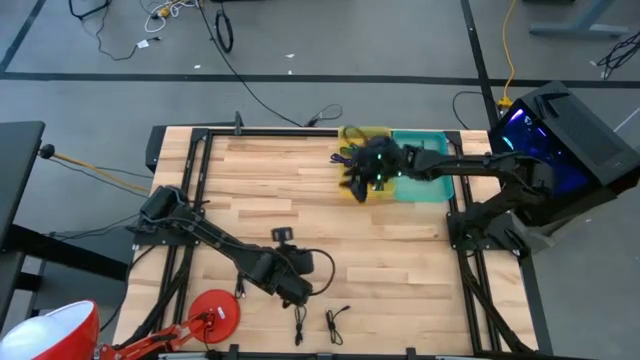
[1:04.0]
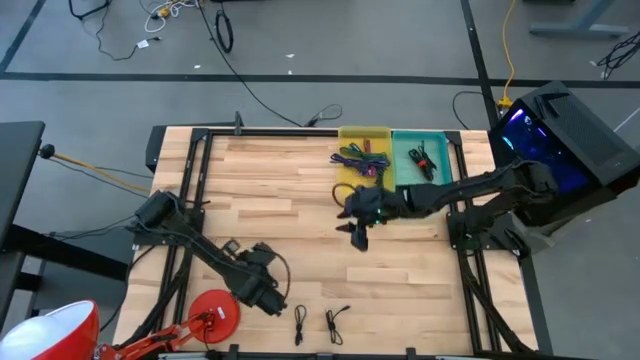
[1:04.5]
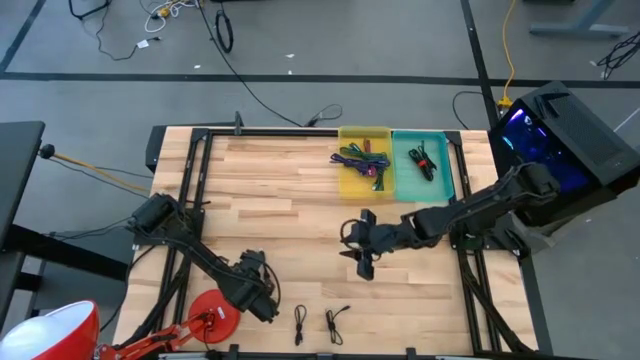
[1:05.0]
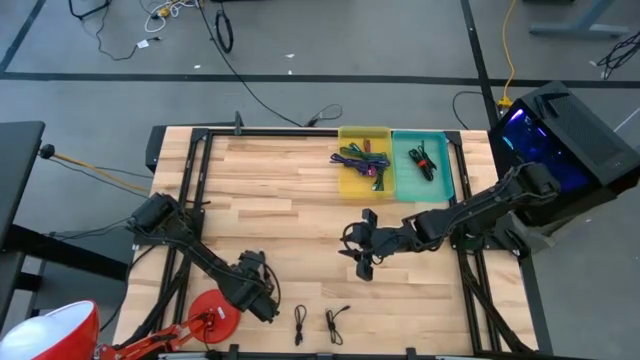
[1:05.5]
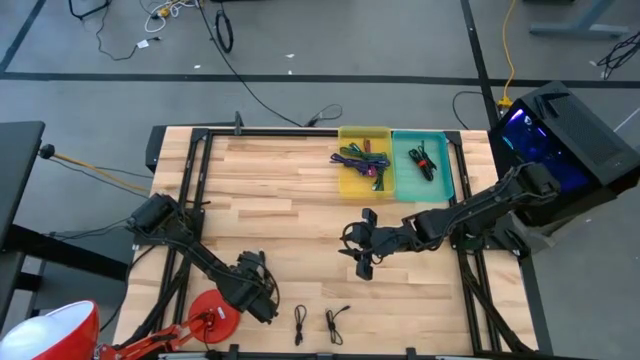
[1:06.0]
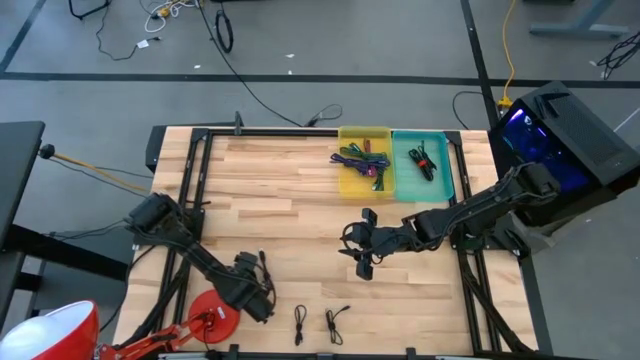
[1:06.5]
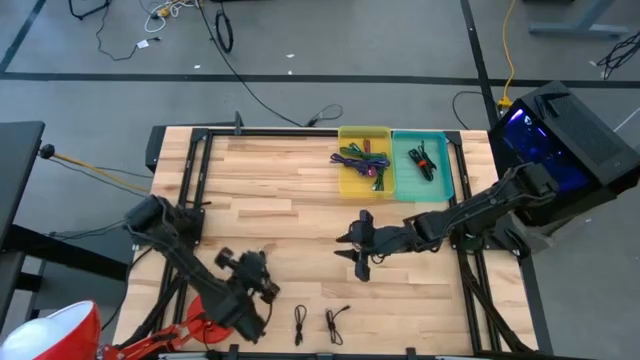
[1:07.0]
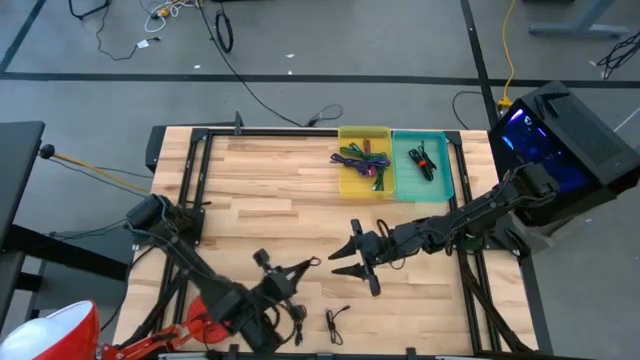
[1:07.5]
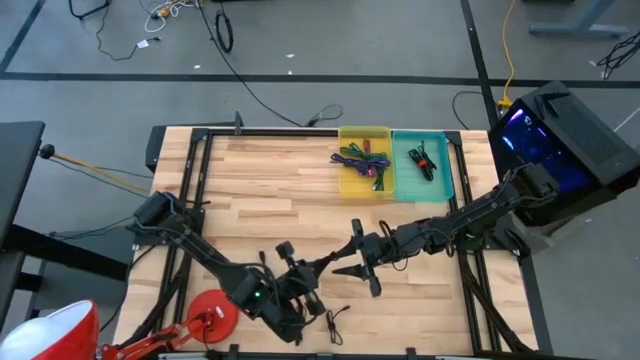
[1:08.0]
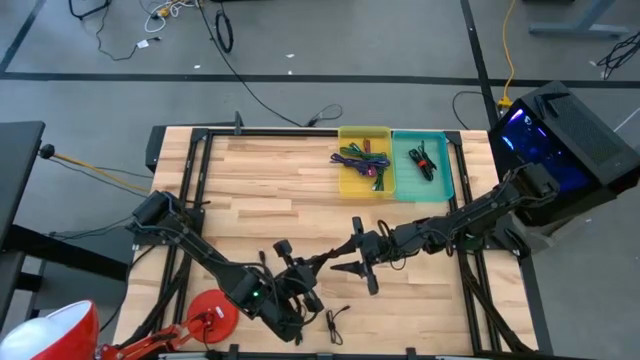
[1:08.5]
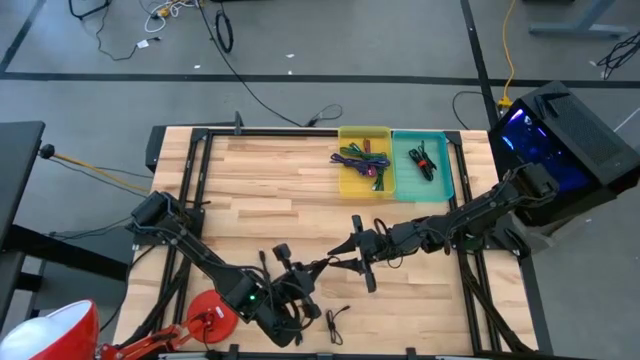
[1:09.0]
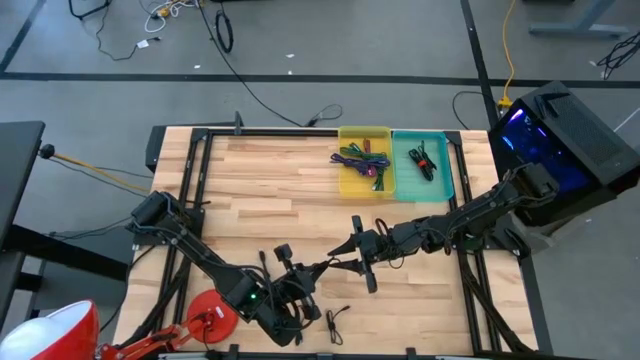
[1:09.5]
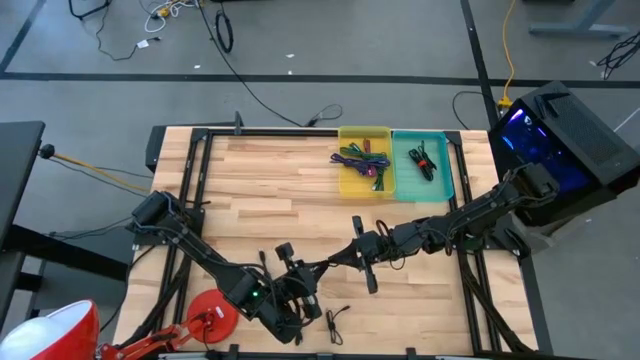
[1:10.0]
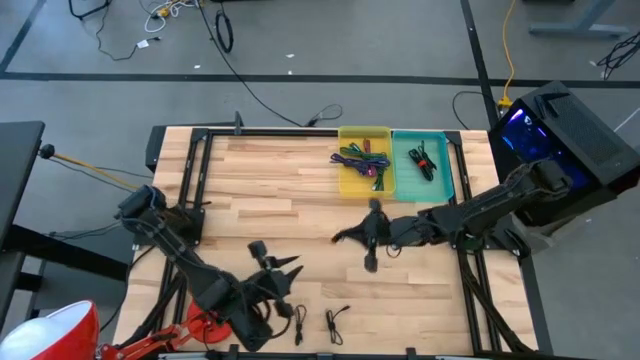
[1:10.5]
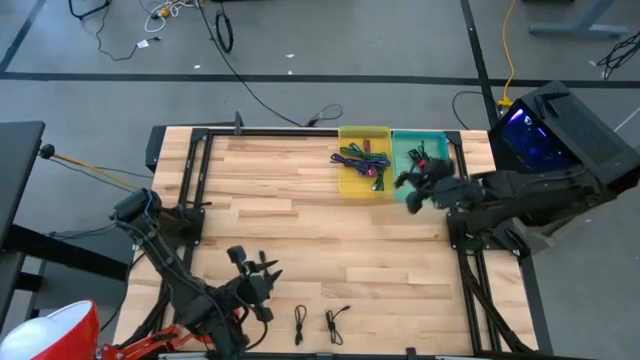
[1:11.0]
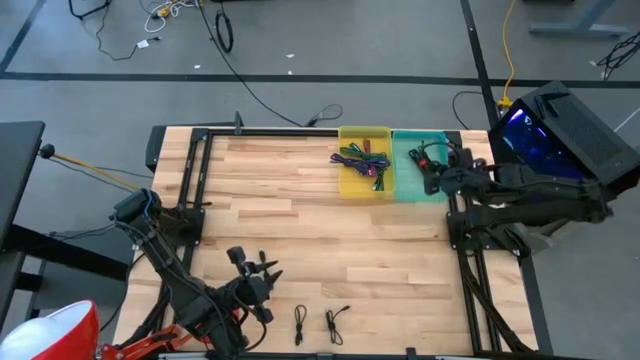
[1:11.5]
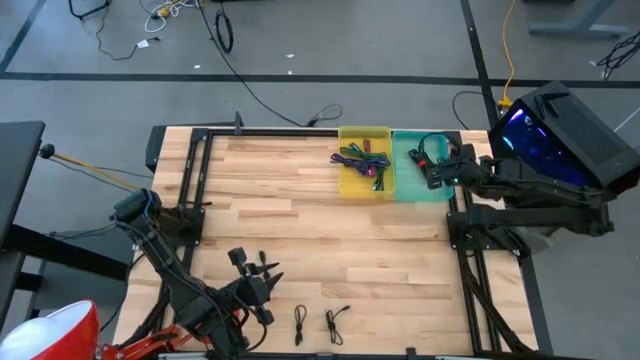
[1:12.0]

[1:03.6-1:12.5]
Task: Pick & Place USB Port
Put the black charger cable into the blue bin

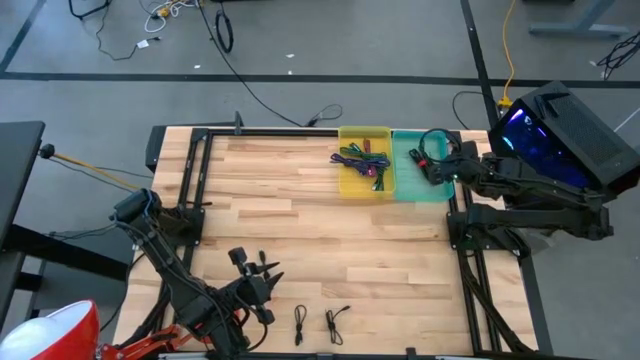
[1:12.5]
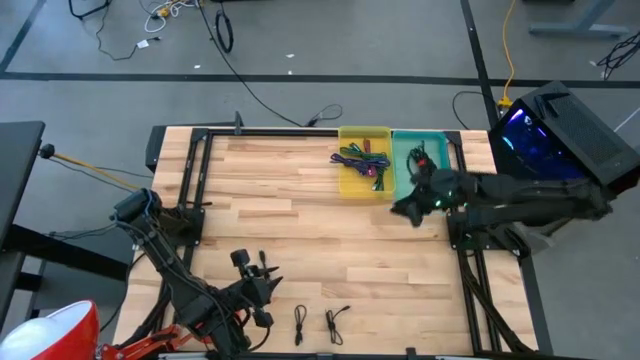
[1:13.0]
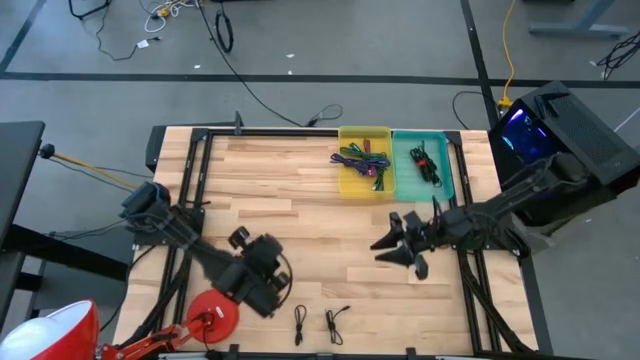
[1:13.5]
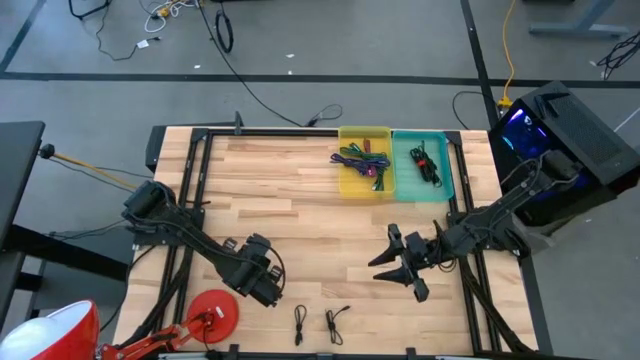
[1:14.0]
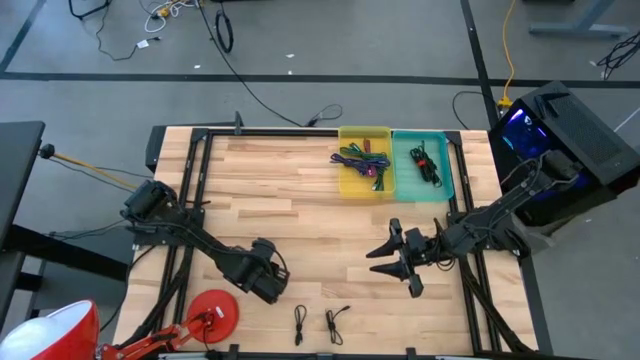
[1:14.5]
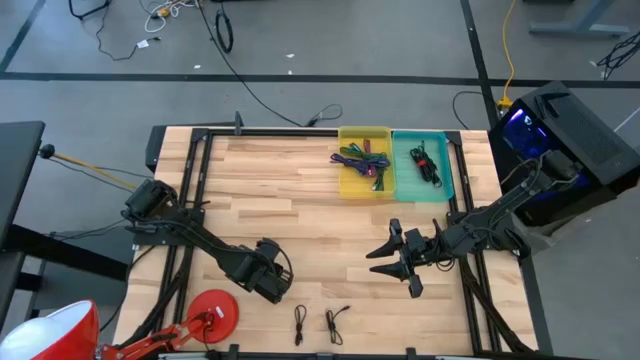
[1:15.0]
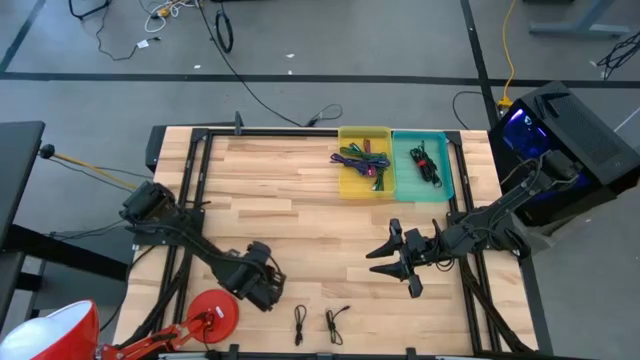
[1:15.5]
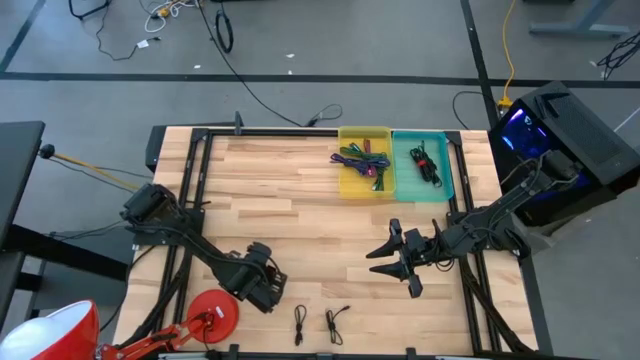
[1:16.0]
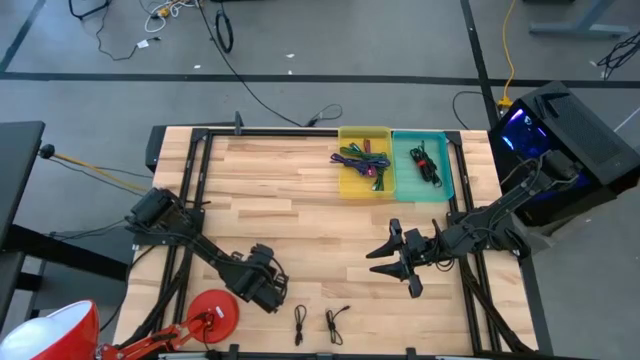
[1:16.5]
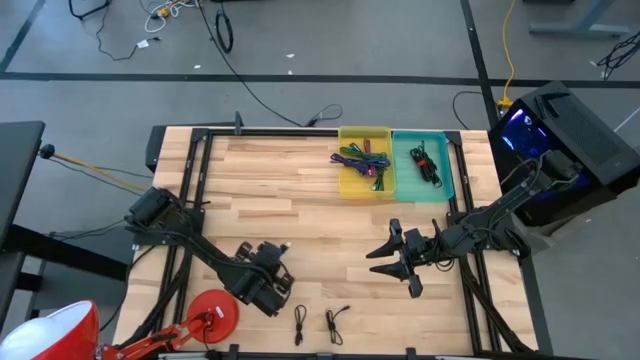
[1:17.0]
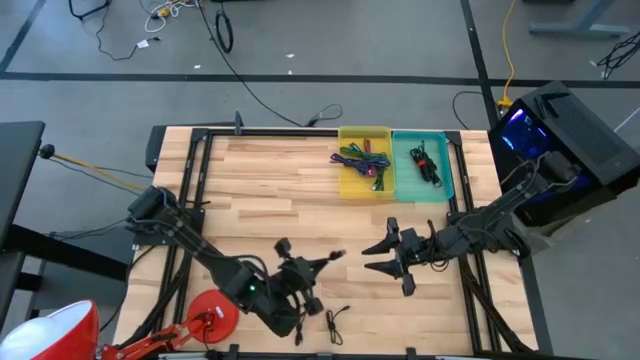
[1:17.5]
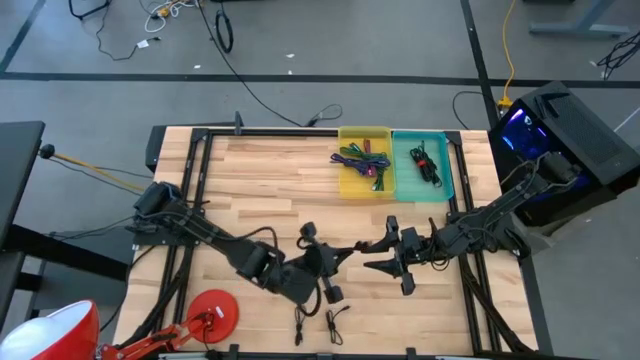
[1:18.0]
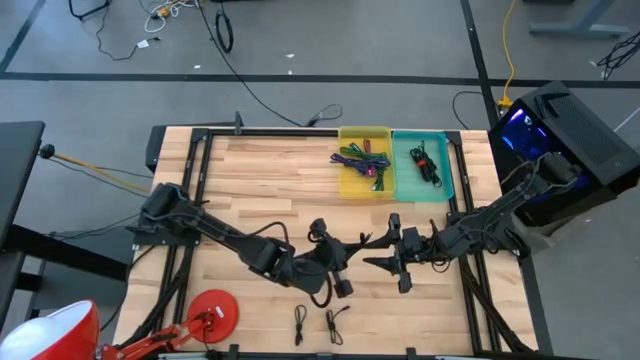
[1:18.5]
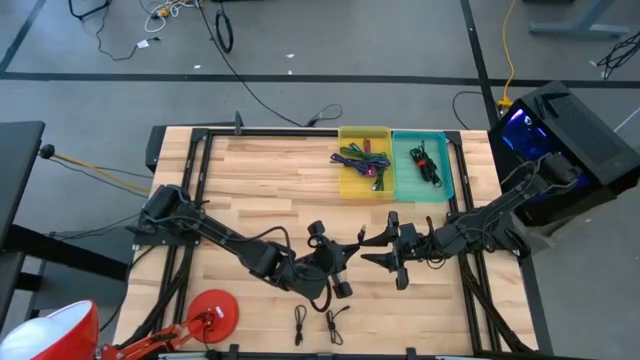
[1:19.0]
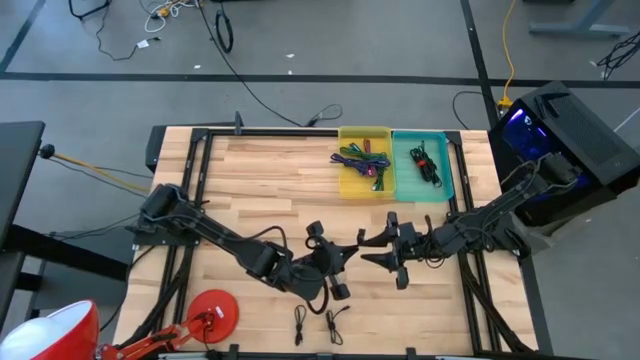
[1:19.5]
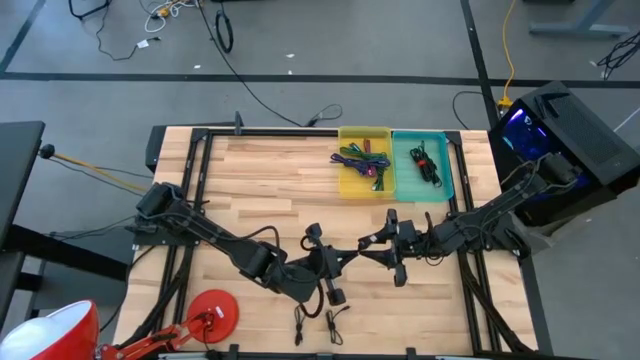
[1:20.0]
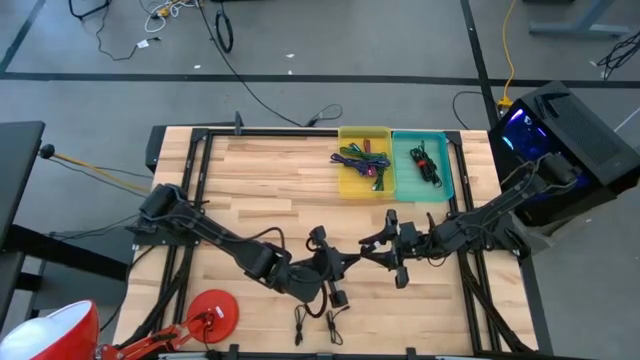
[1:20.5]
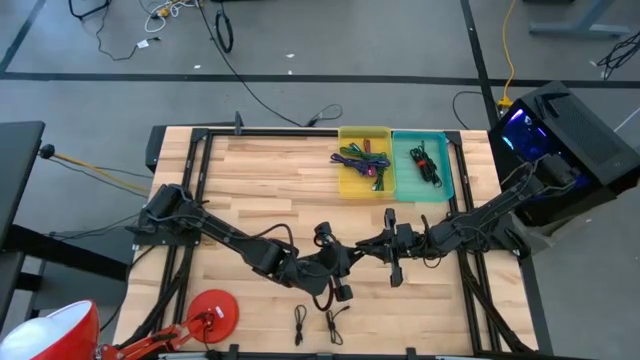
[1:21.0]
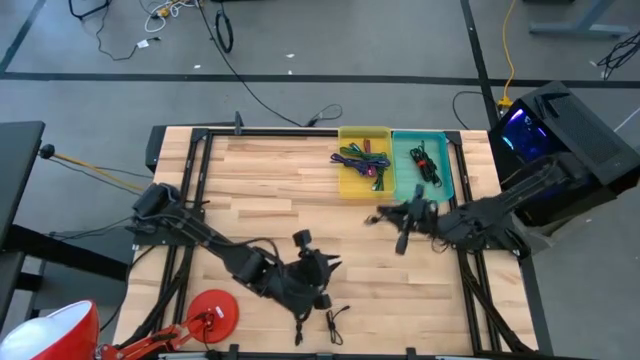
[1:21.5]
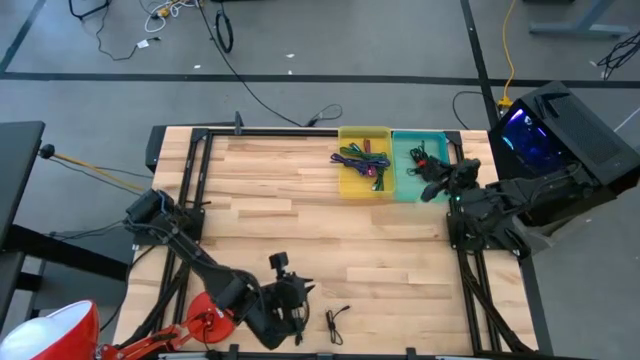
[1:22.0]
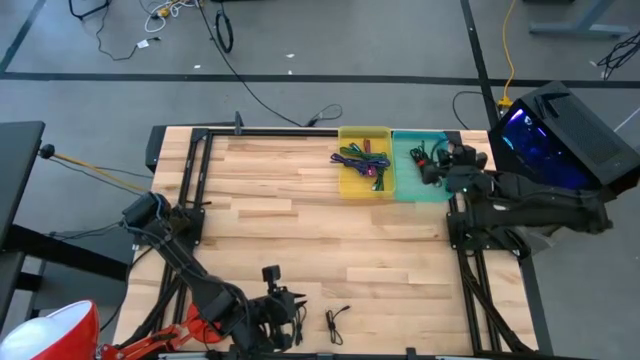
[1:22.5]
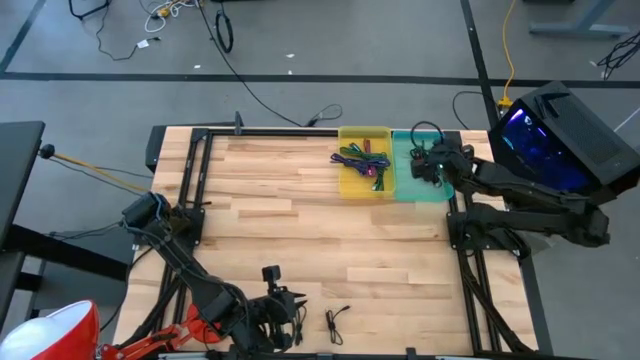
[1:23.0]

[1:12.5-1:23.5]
Put the black charger cable into the blue bin

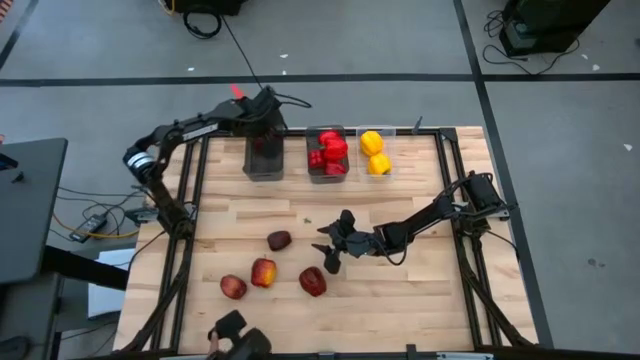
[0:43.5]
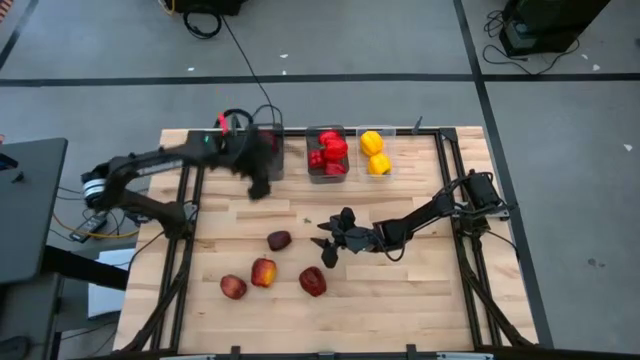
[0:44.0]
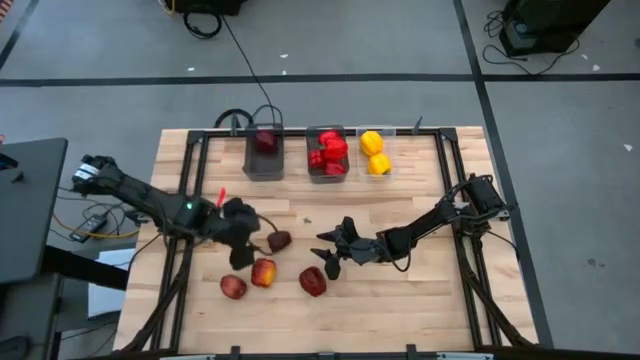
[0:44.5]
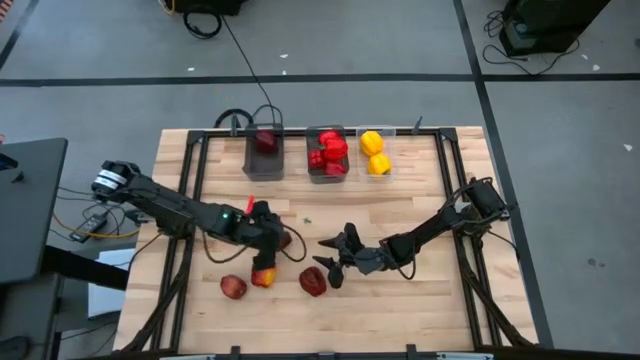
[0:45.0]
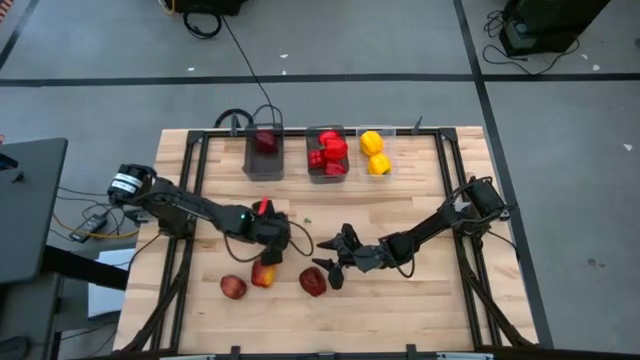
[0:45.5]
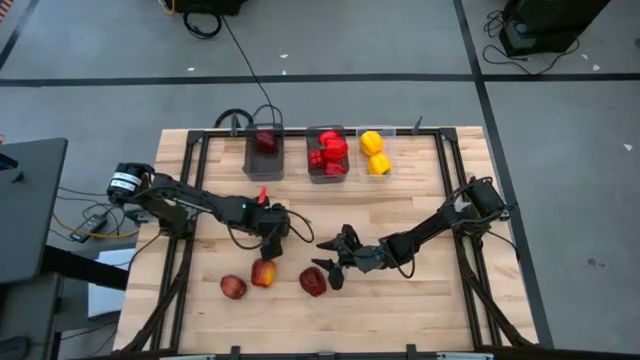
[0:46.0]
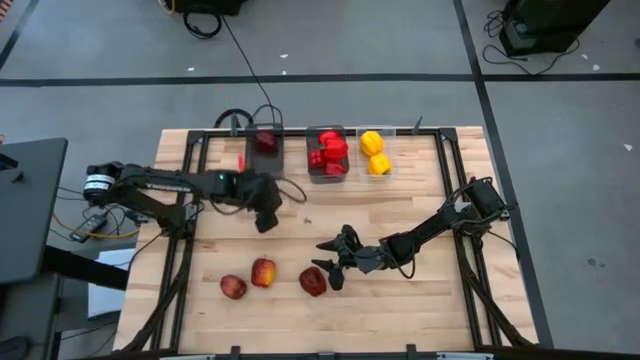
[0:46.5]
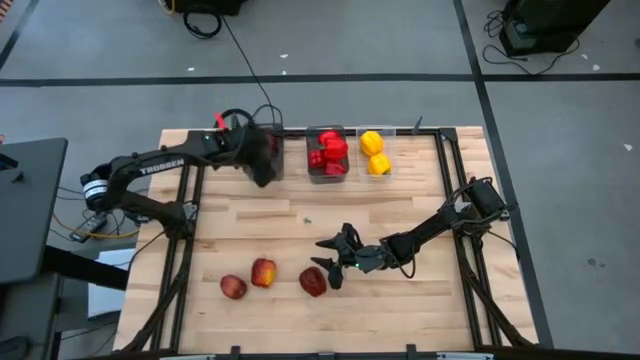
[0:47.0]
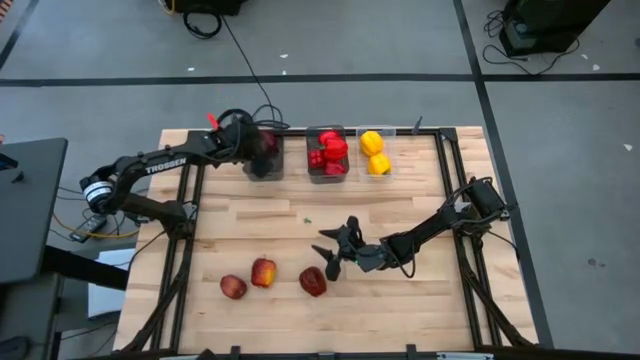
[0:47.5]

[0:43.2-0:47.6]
Task: Sort produce into baskets
Put the dark red apple into the left black bin
